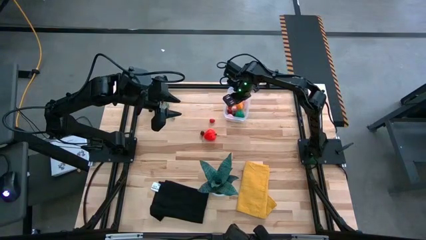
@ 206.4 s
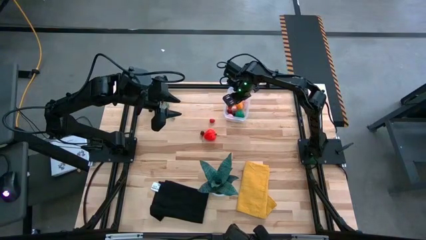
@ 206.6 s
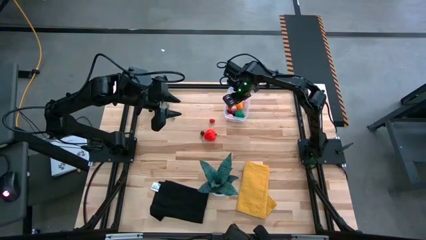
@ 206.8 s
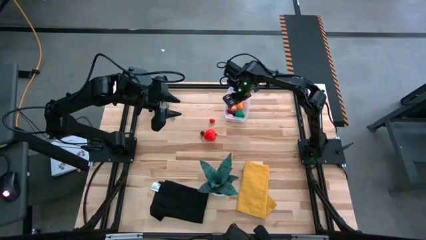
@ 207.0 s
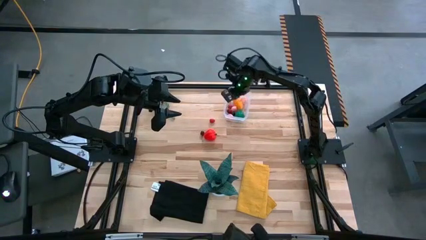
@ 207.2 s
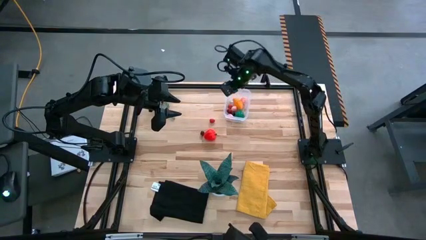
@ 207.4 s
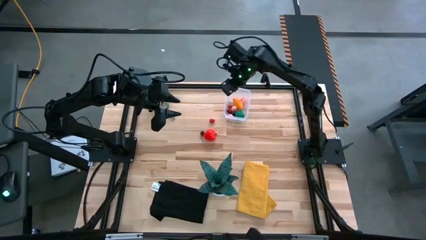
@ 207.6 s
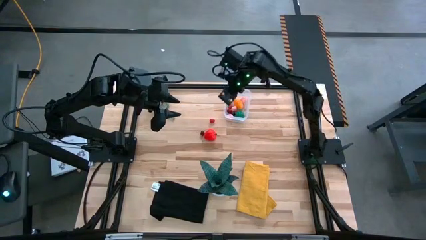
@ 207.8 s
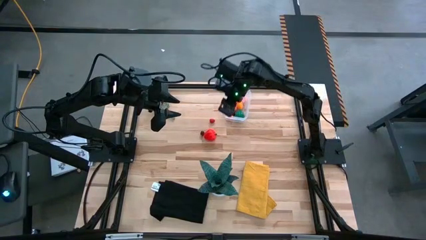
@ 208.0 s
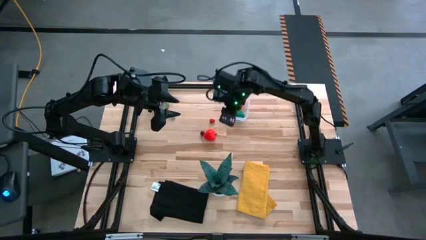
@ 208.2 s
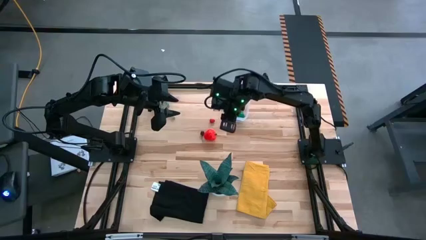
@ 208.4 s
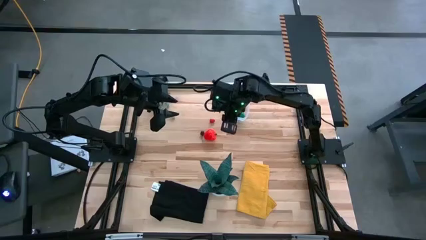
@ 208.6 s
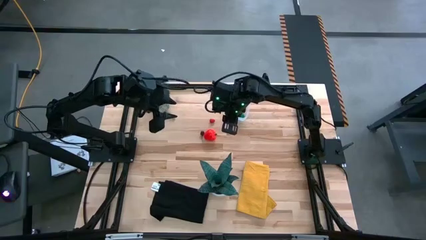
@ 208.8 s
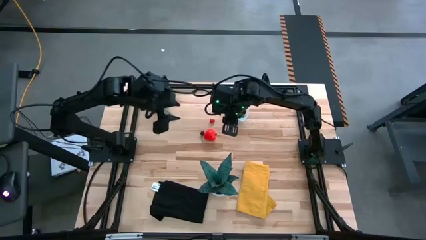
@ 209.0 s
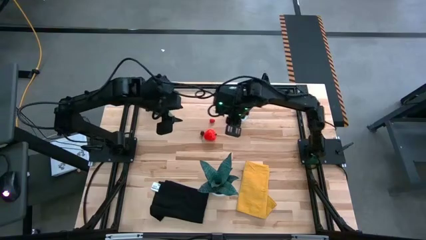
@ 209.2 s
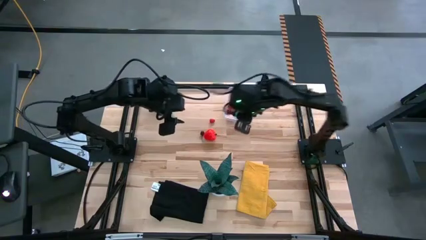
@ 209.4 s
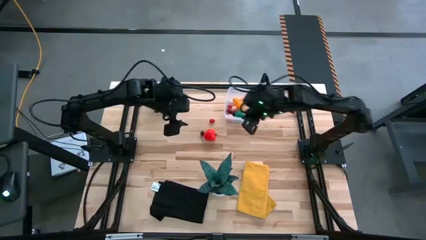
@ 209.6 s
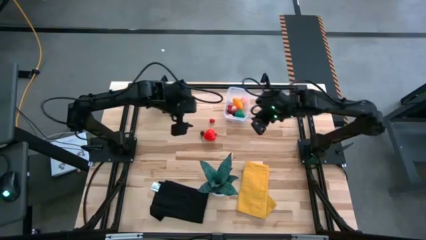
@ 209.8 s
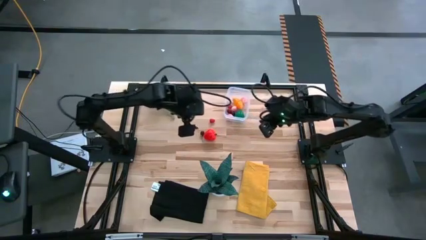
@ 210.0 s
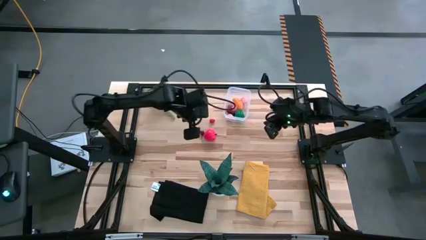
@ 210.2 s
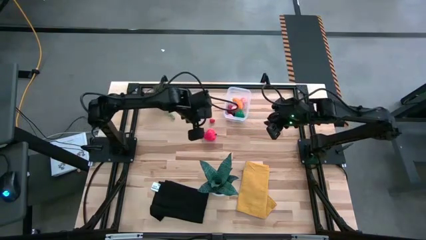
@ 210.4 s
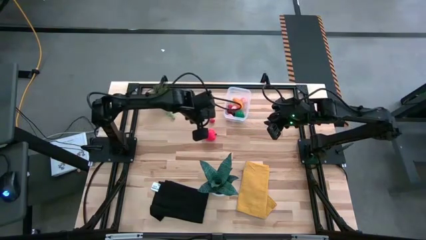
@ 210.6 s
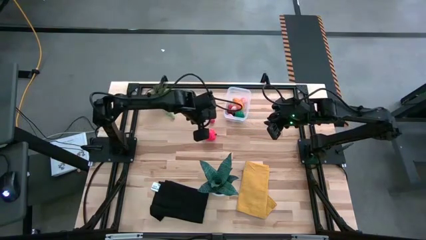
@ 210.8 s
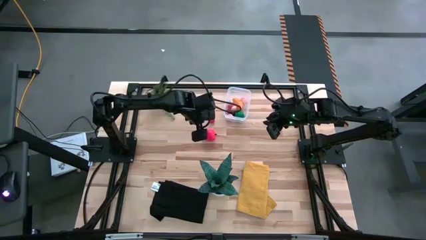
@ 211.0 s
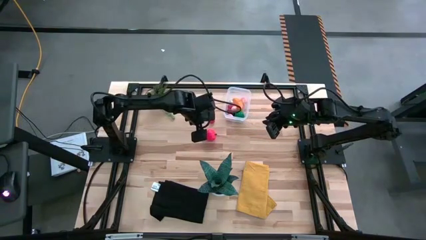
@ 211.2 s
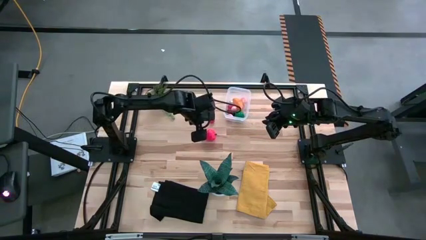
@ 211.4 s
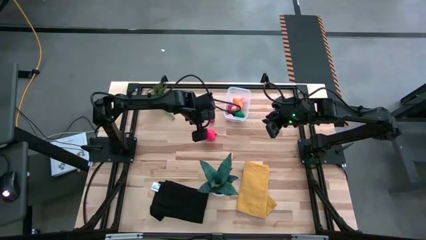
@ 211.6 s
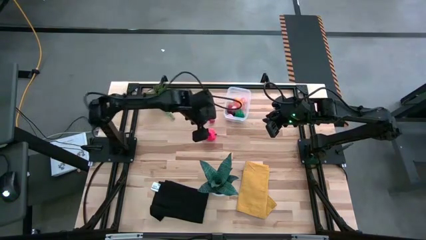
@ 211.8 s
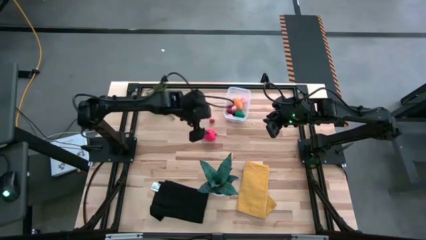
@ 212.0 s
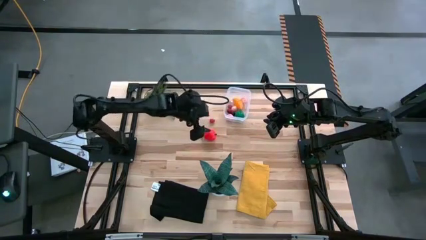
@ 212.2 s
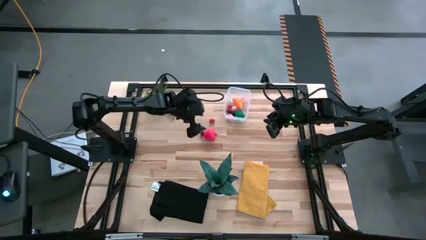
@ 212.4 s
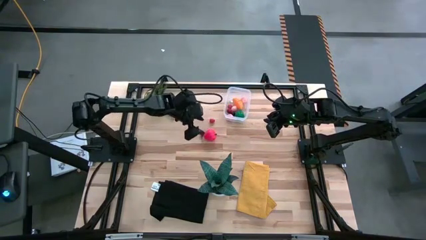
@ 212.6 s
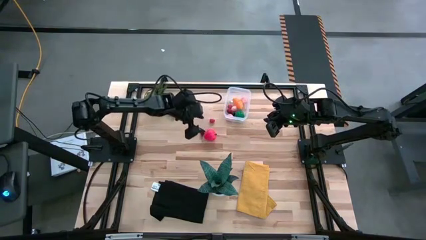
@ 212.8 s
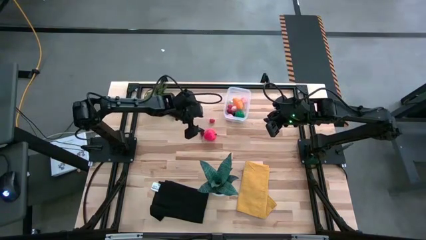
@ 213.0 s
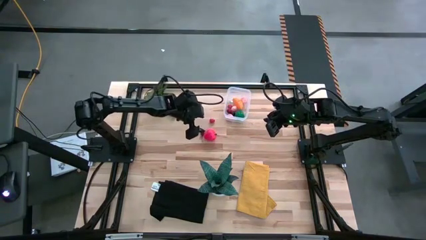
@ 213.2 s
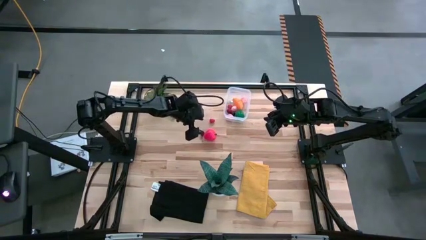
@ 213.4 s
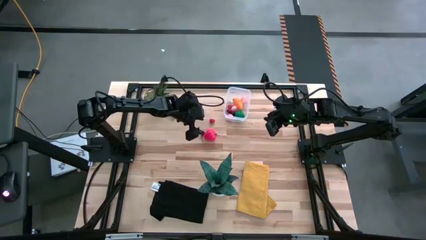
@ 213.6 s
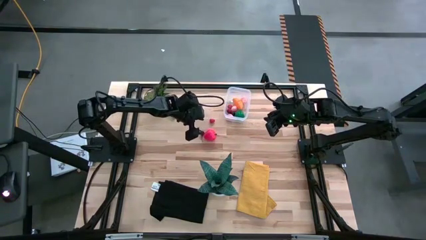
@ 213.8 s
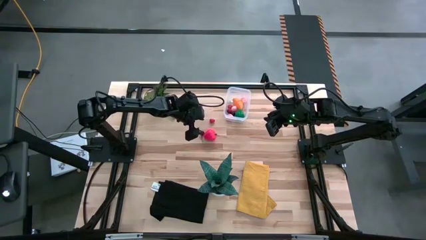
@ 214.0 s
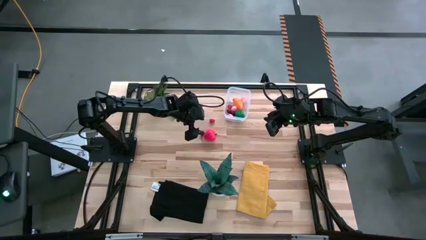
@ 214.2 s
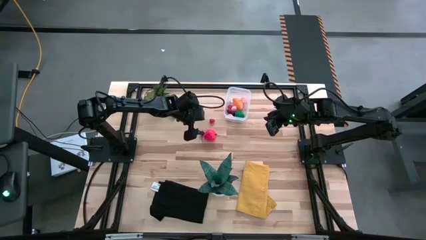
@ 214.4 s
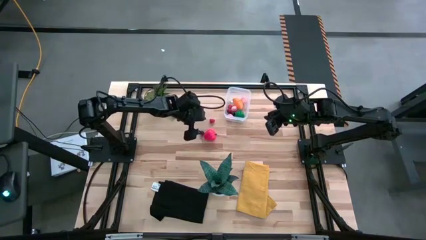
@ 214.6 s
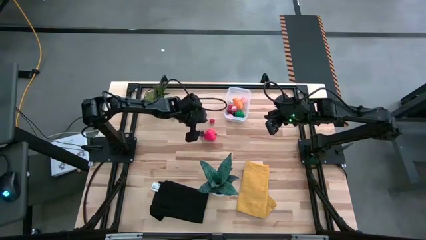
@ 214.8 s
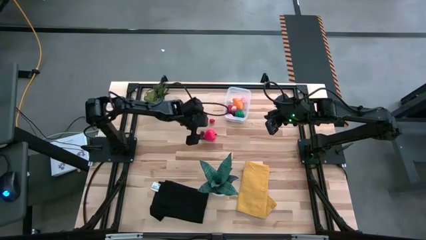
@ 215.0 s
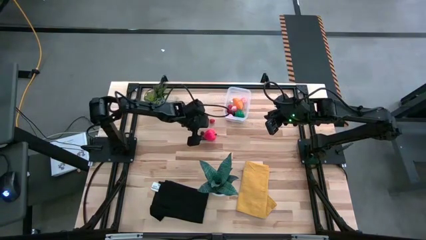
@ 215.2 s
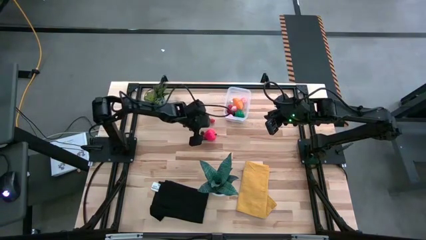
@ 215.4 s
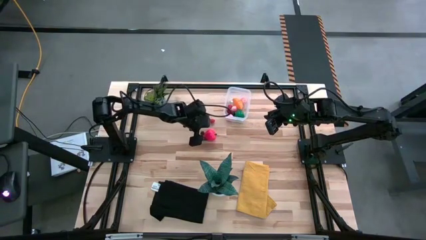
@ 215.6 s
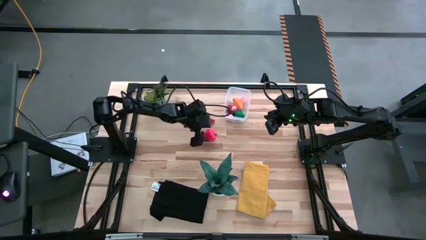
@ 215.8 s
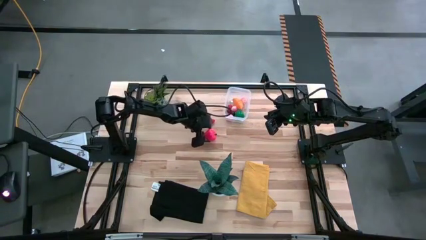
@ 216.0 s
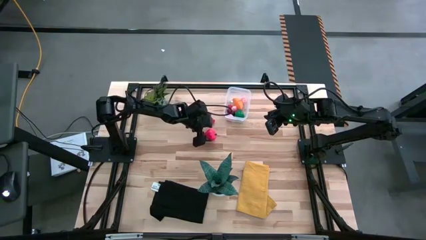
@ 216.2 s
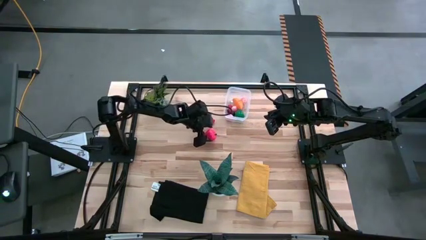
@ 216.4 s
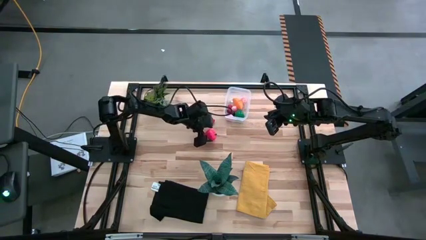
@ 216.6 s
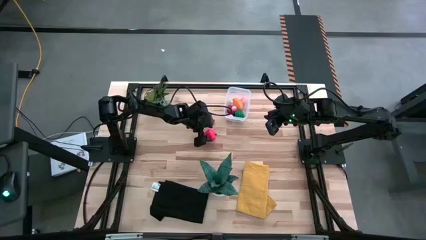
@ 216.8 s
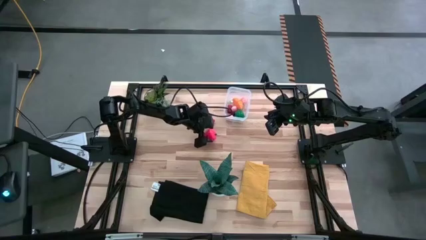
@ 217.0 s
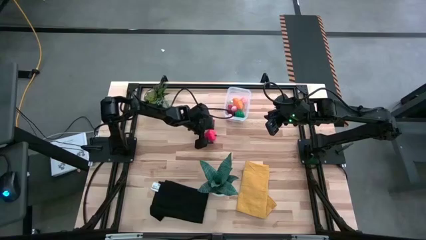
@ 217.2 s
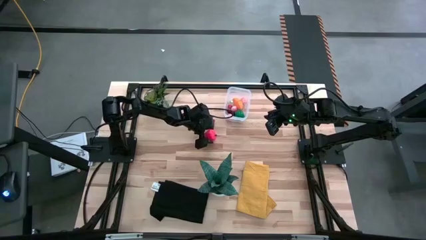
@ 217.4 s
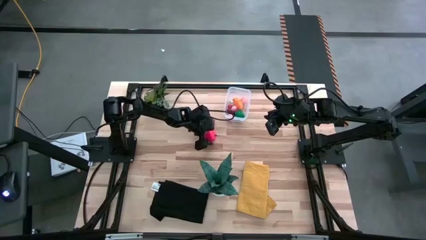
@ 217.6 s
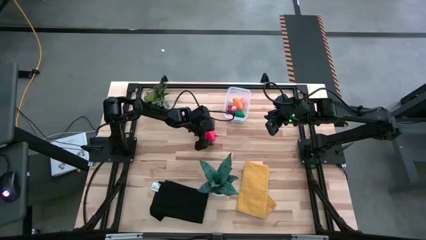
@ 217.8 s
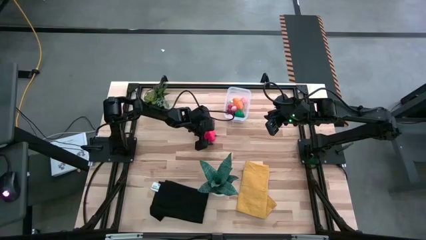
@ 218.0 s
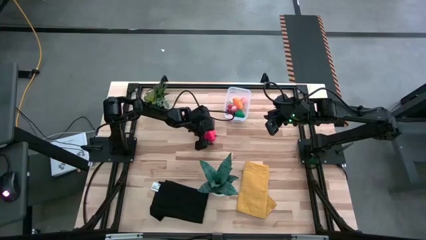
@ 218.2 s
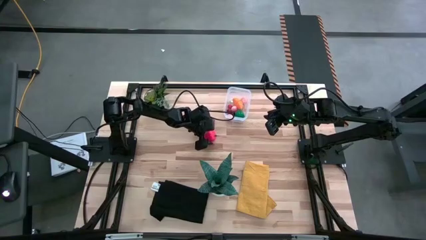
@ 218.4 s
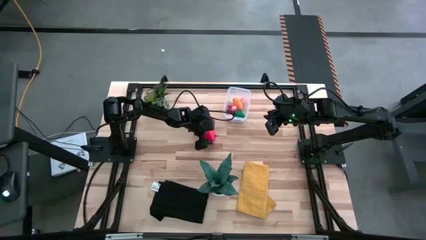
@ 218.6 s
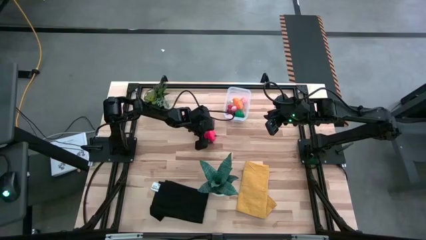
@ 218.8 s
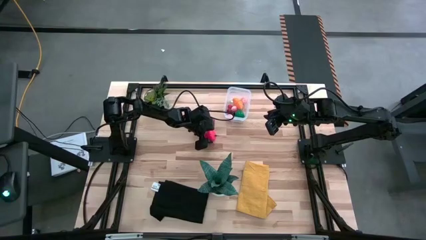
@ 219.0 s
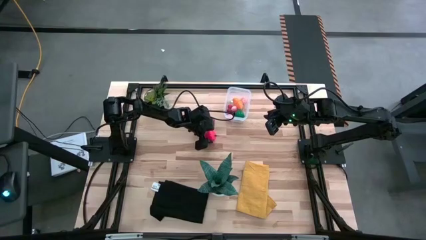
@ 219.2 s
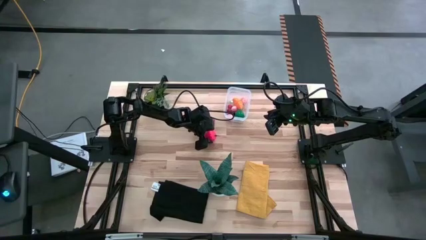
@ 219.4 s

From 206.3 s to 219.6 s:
Task: Pick and placing Produce into tupperware
Put the apple into the transparent container

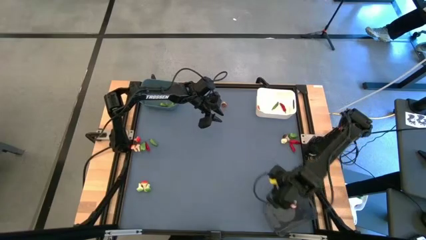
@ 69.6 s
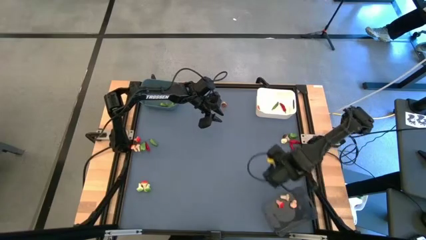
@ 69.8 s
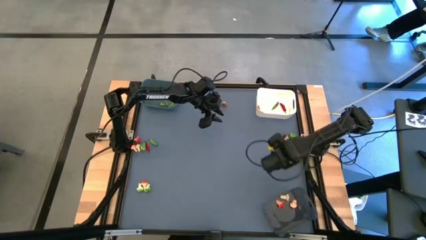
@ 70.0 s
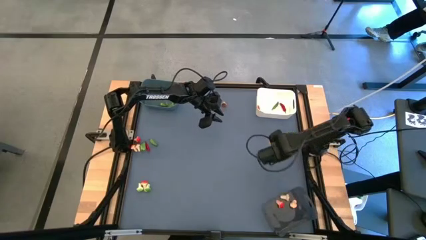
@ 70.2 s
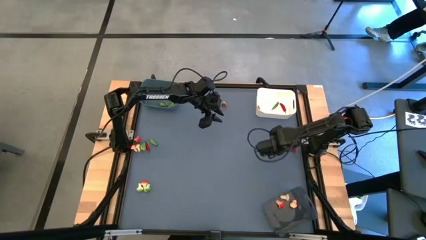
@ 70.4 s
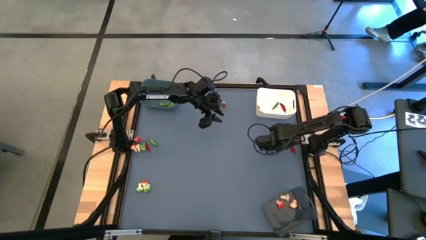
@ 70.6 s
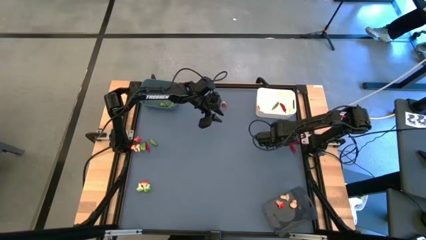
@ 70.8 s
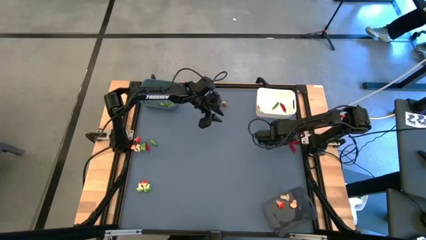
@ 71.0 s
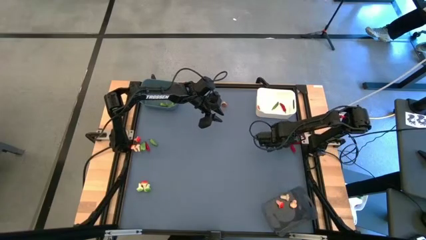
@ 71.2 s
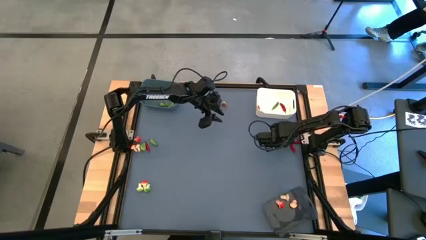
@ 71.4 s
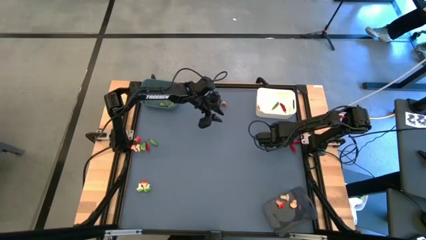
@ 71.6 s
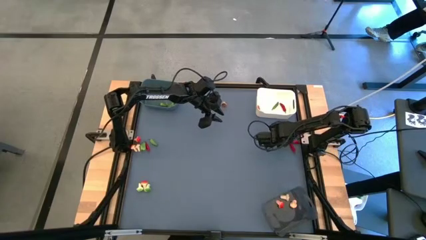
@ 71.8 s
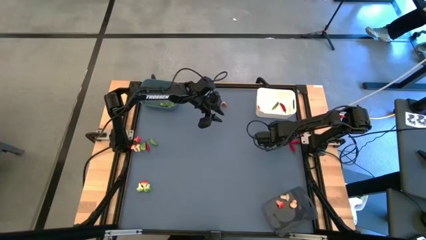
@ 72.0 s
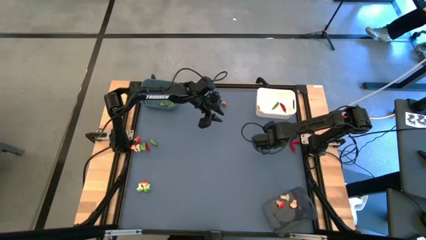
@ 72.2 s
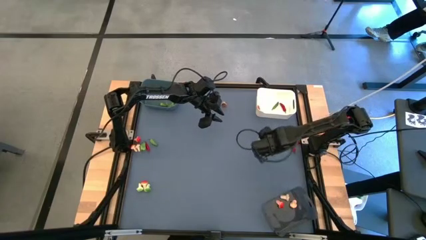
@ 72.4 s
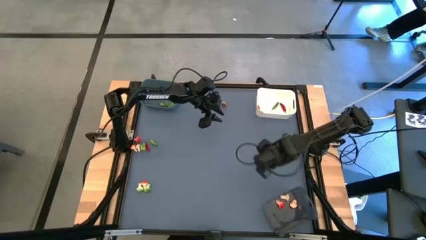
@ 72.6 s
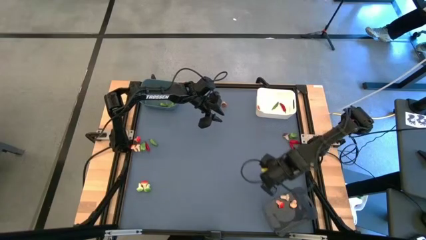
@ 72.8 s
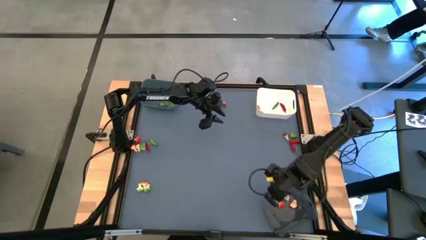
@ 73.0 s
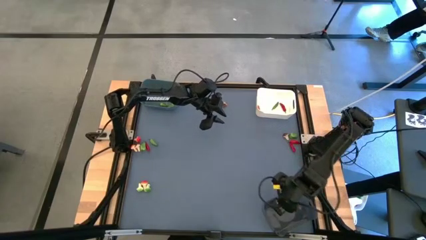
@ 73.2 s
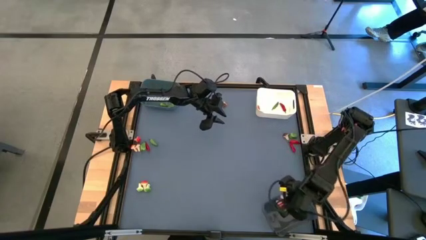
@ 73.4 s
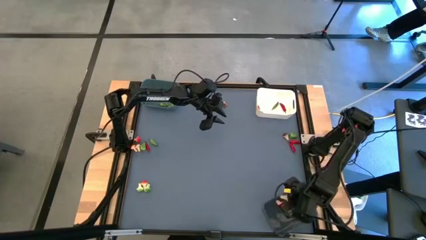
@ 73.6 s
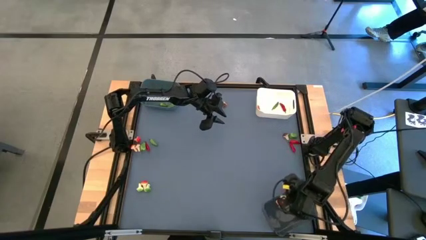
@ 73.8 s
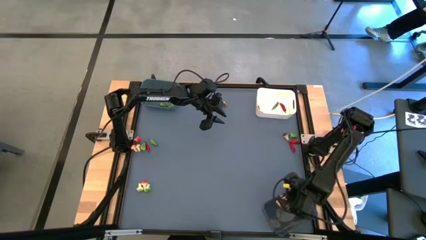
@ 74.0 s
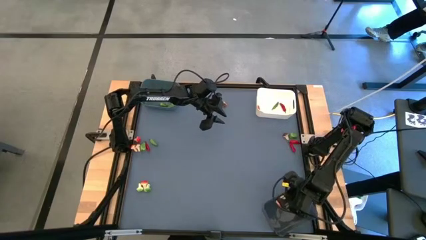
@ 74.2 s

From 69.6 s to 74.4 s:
Task: Sort produce into baskets
Put the green mushroom into the black bin
